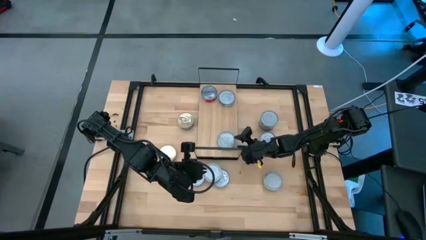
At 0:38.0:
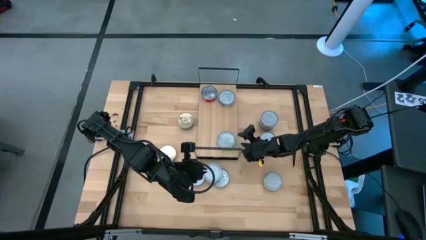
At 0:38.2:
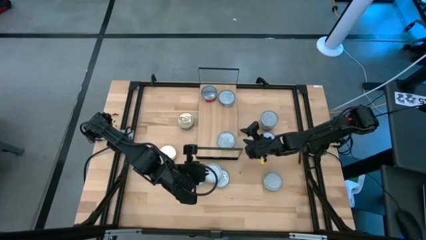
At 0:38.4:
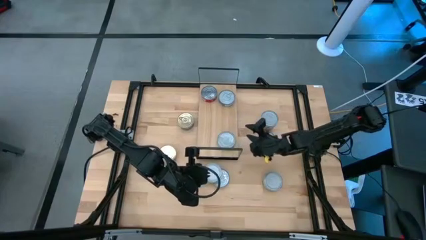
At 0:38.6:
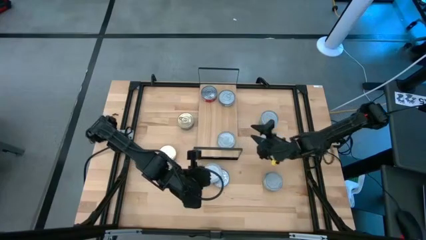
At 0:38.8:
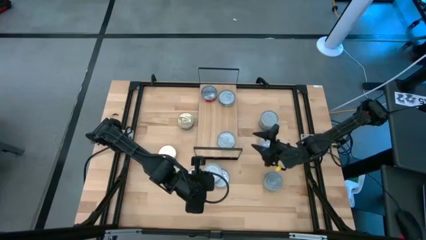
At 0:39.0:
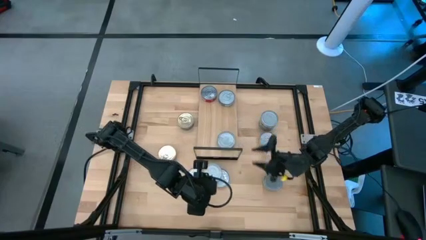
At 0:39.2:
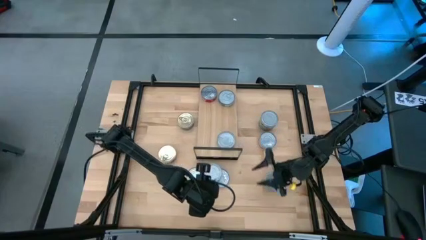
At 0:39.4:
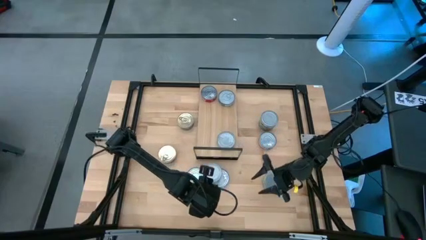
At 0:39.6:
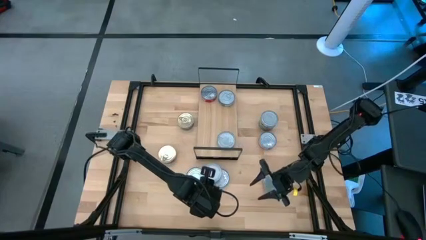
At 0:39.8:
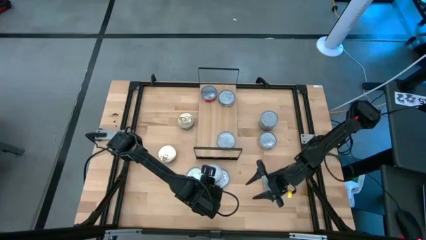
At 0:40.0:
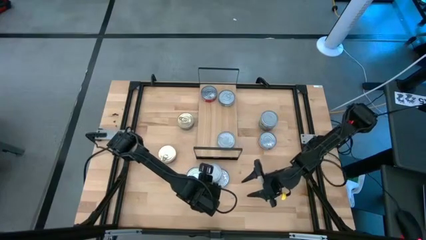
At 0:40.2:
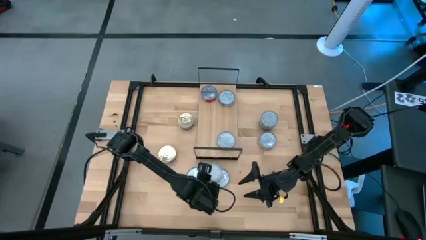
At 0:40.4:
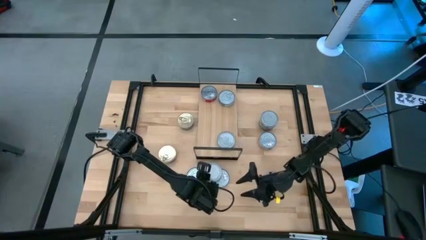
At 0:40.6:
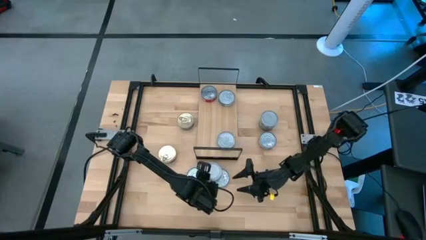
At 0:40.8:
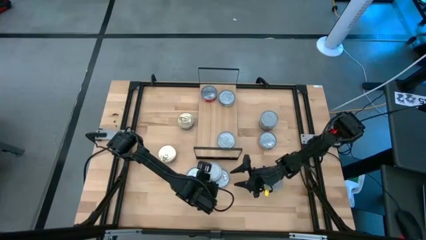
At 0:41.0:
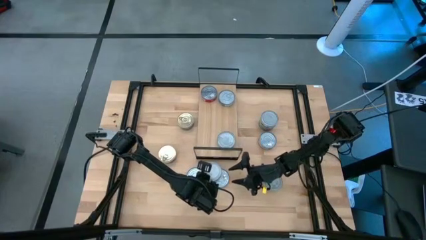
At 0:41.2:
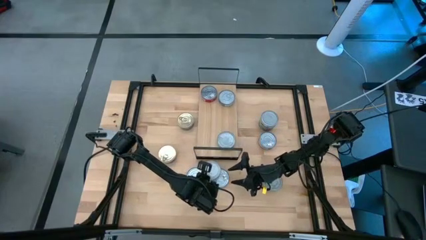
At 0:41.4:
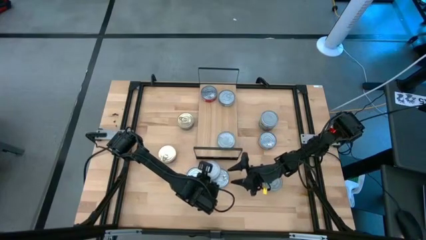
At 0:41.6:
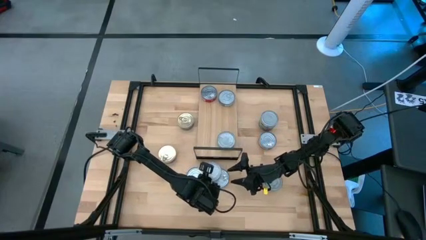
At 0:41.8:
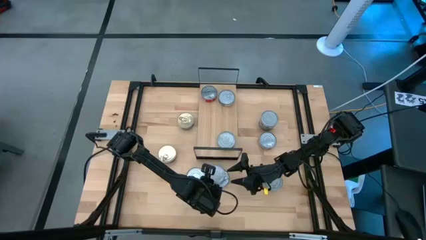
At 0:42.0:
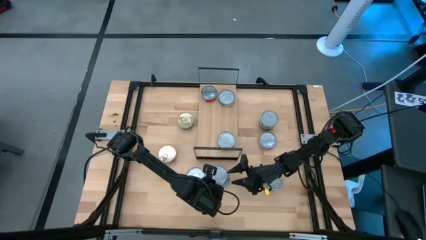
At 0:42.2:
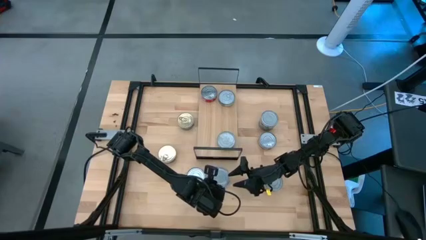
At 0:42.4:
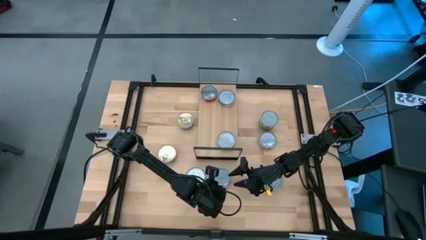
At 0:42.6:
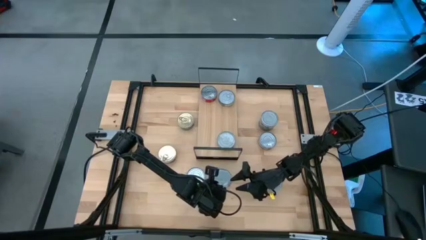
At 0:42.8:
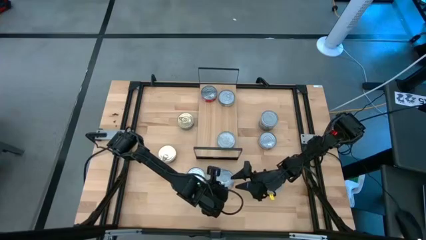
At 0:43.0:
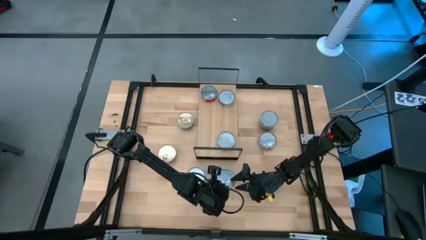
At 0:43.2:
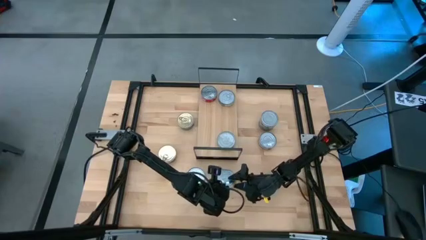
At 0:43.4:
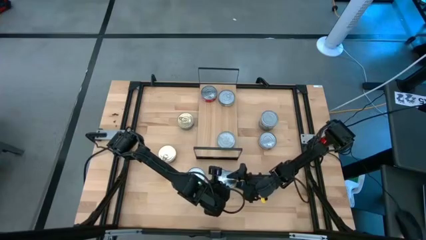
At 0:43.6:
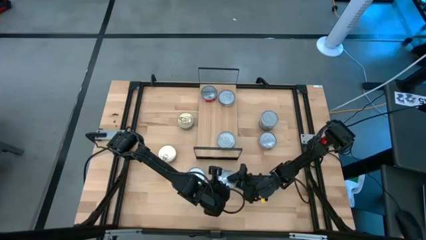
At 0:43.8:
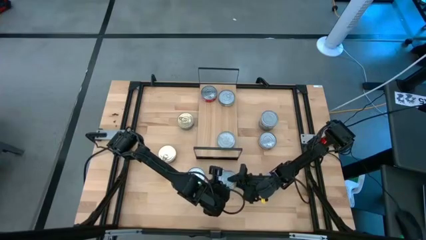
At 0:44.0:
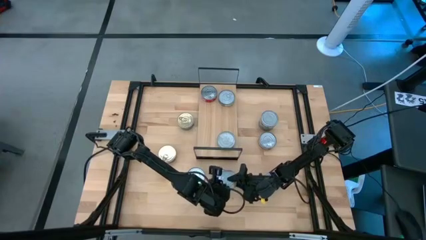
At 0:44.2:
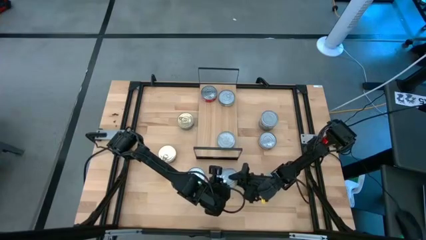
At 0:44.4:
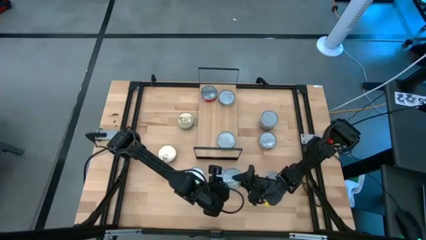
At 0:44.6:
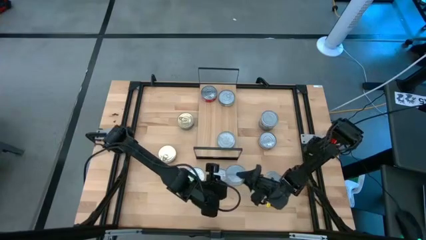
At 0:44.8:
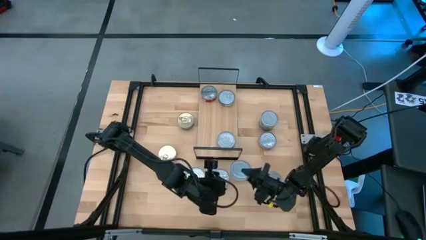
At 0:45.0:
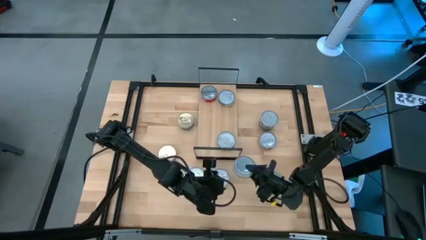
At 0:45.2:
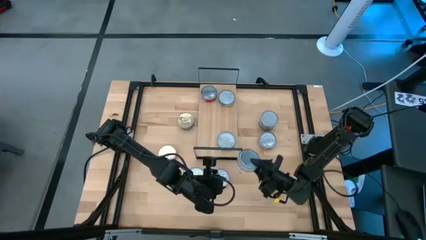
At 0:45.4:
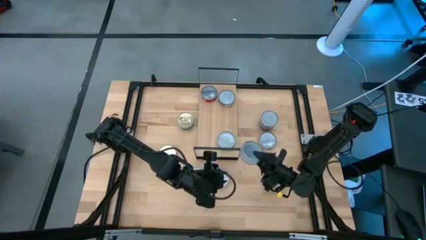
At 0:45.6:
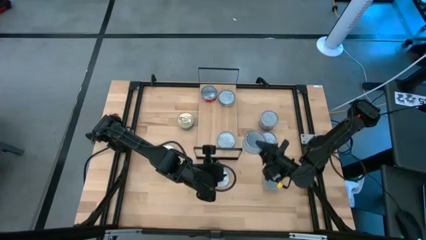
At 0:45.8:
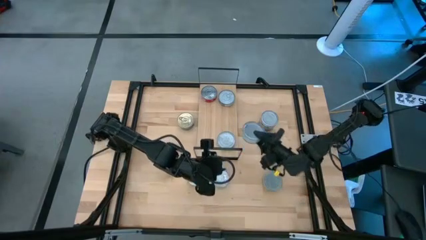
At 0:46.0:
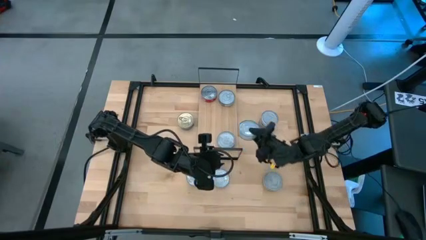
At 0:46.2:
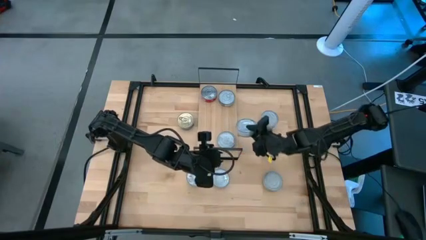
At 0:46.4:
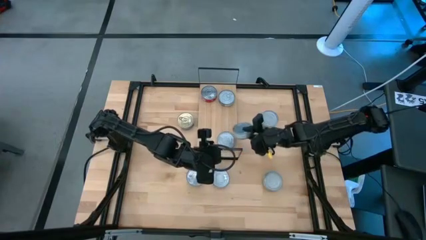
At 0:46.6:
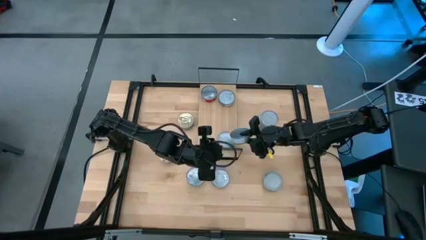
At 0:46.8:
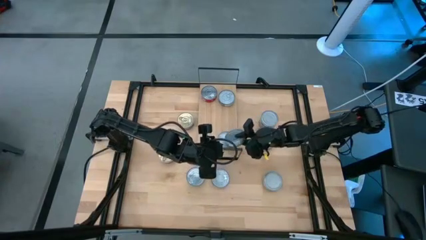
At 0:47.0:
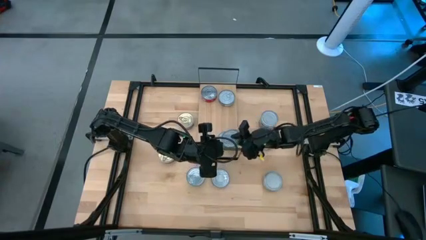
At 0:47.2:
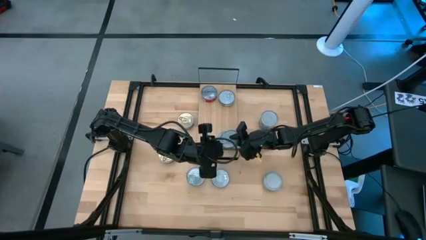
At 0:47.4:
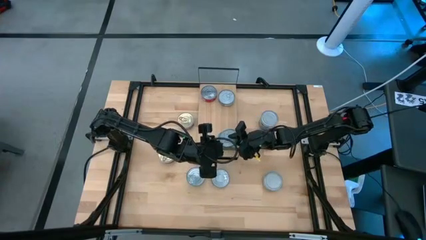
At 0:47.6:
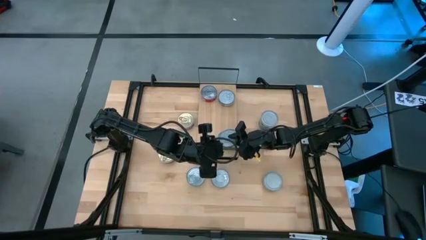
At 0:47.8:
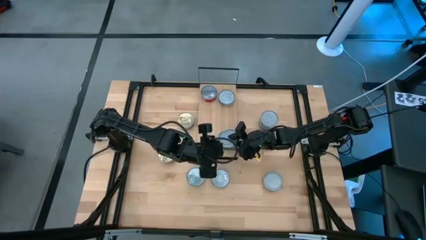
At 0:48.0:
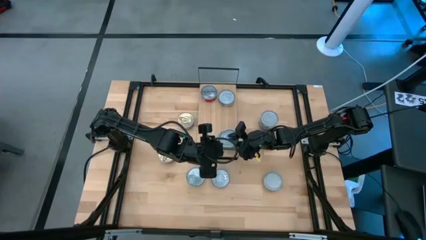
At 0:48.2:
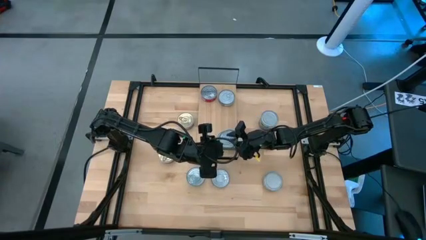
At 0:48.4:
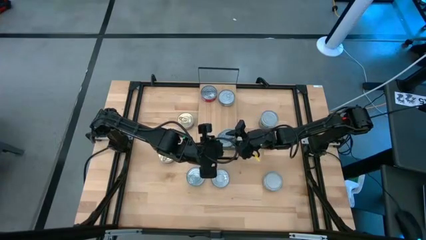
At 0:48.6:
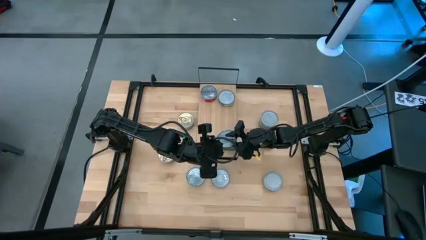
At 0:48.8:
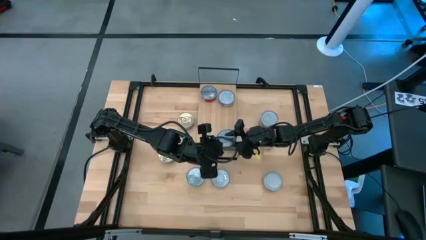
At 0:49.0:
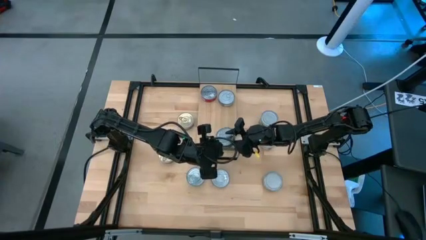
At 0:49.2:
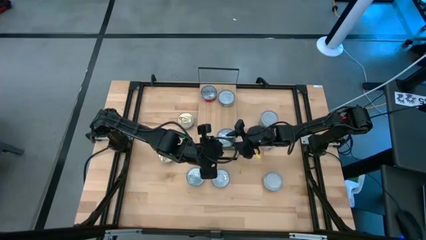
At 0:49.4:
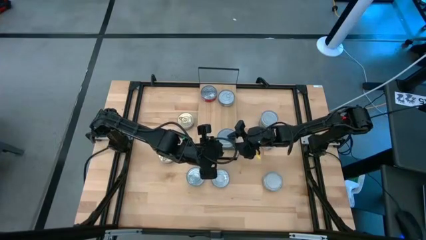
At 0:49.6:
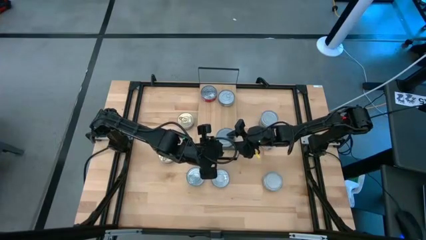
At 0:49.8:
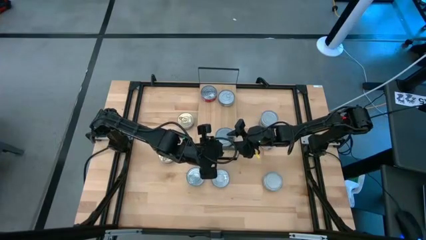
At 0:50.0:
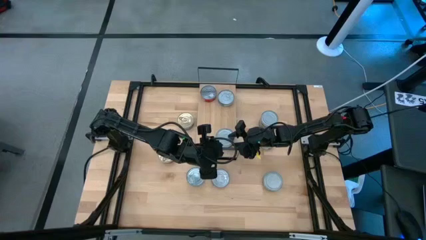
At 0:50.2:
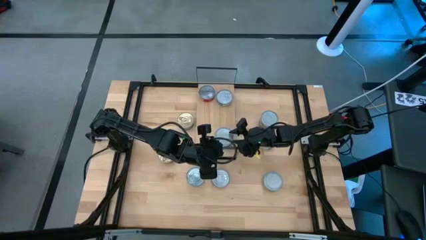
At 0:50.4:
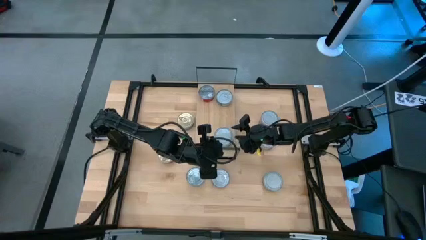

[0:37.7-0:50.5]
Task: Stack canned seafood by type on shelf
Stack the green tuna can on top of the other green tuna can on the shelf
